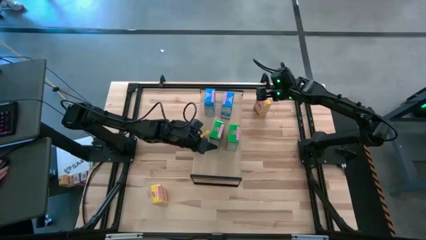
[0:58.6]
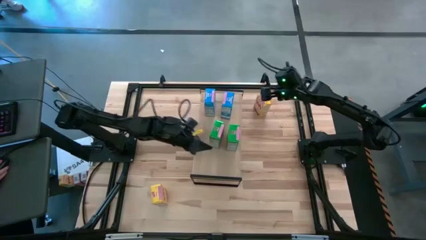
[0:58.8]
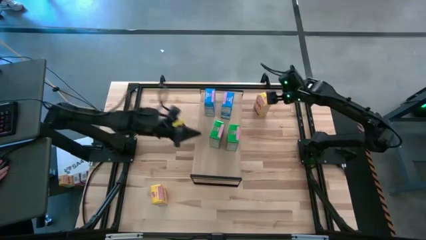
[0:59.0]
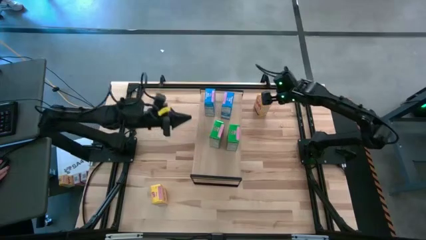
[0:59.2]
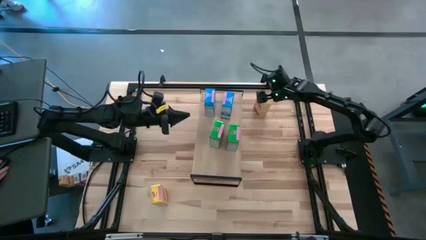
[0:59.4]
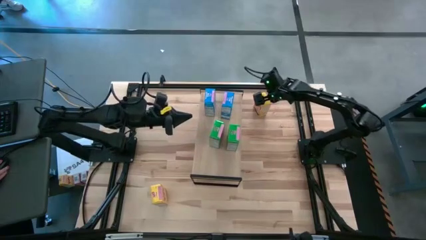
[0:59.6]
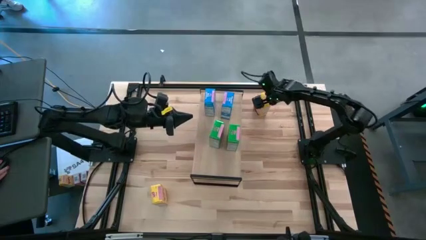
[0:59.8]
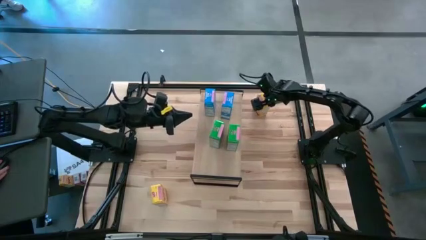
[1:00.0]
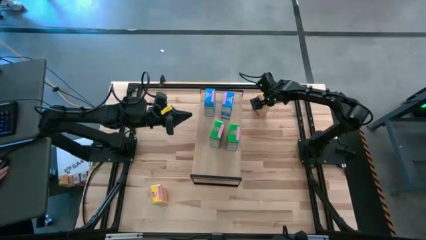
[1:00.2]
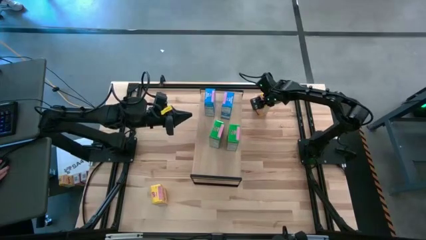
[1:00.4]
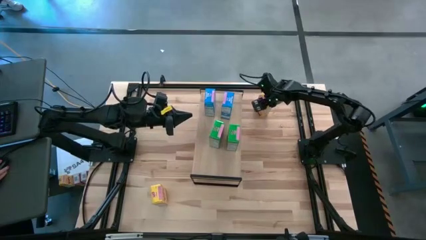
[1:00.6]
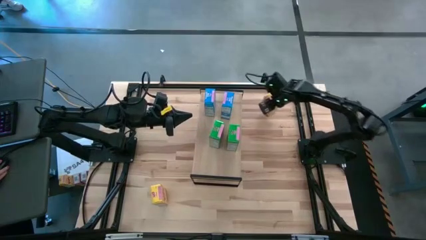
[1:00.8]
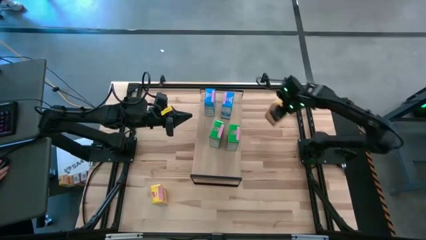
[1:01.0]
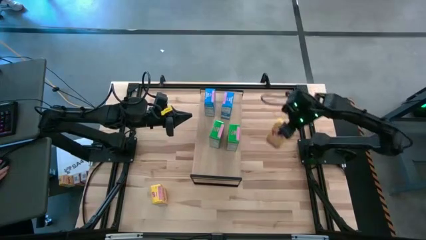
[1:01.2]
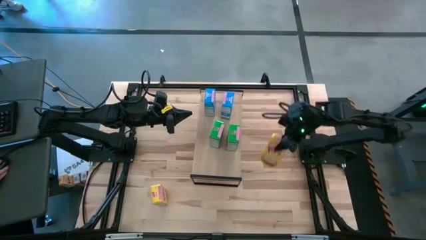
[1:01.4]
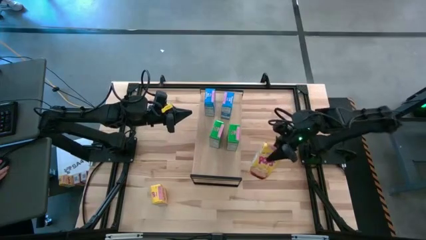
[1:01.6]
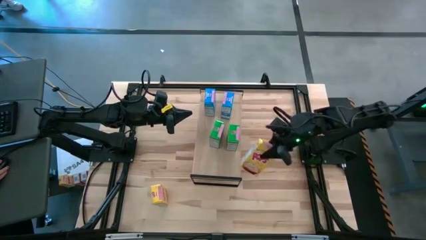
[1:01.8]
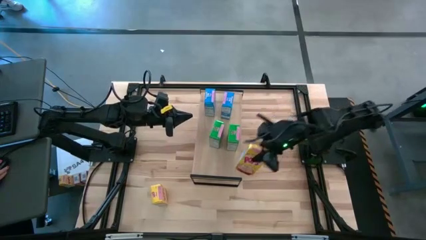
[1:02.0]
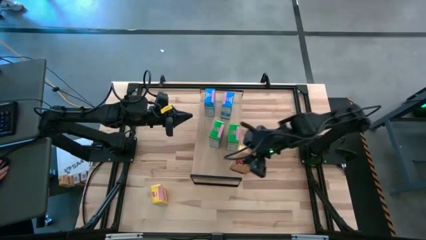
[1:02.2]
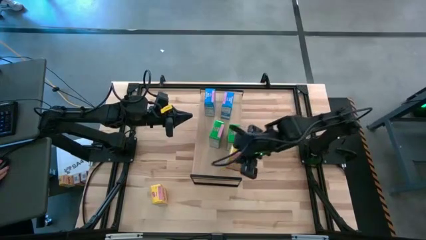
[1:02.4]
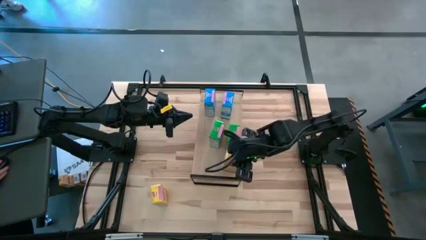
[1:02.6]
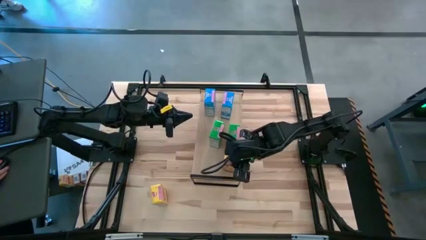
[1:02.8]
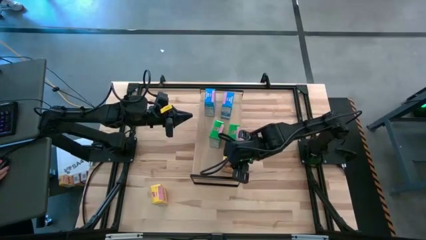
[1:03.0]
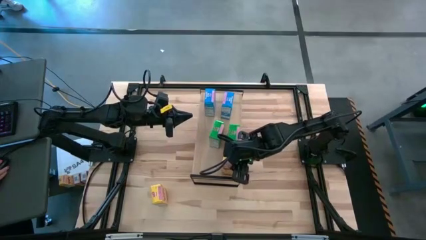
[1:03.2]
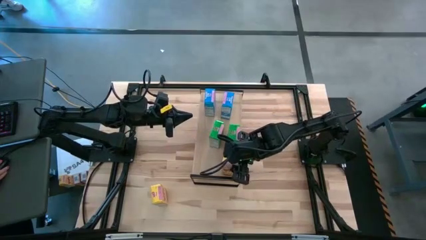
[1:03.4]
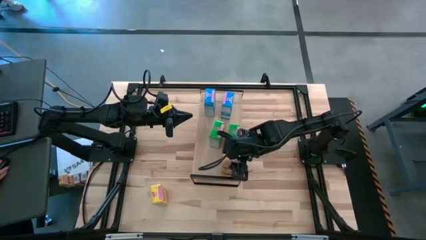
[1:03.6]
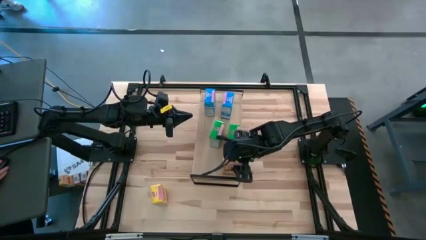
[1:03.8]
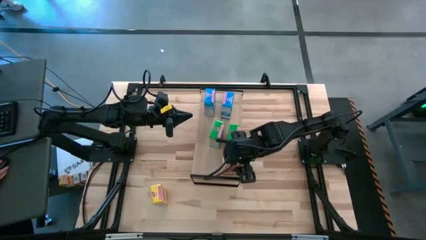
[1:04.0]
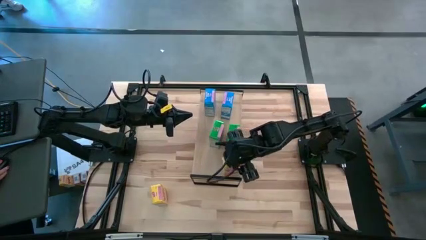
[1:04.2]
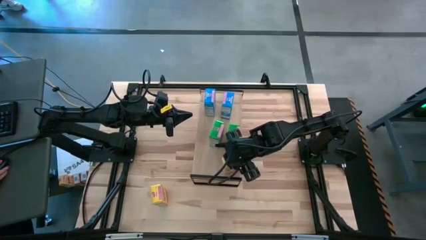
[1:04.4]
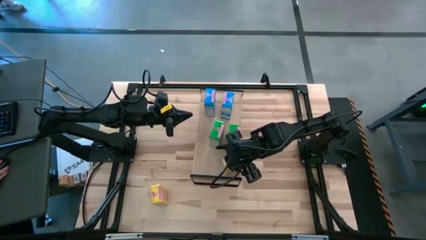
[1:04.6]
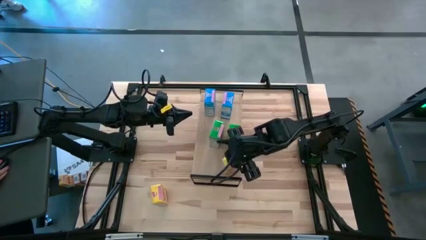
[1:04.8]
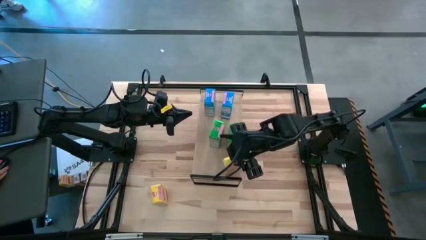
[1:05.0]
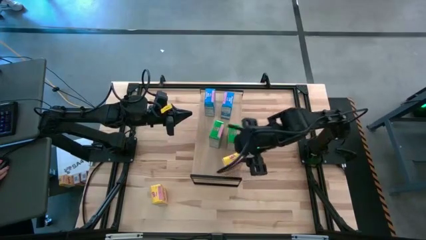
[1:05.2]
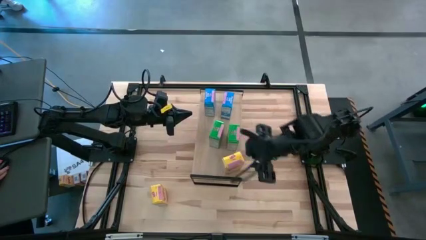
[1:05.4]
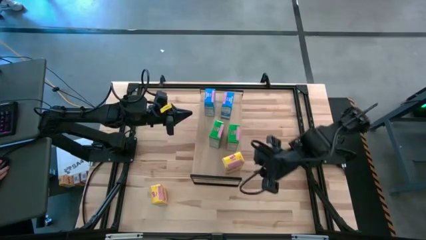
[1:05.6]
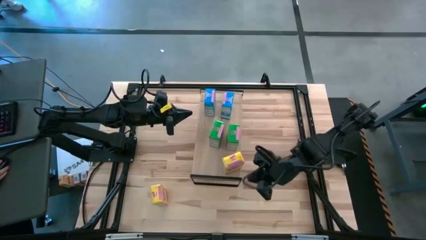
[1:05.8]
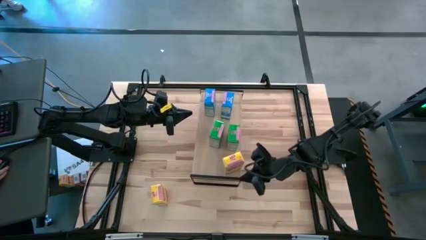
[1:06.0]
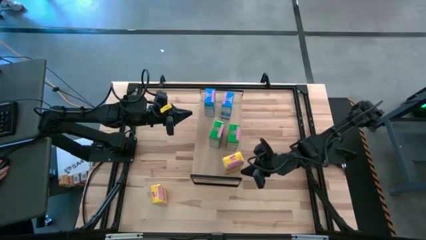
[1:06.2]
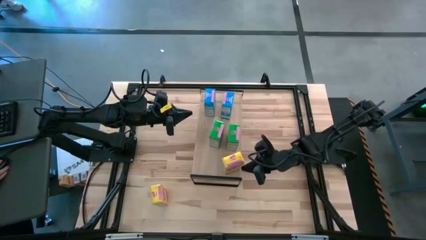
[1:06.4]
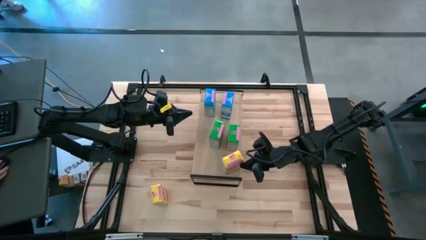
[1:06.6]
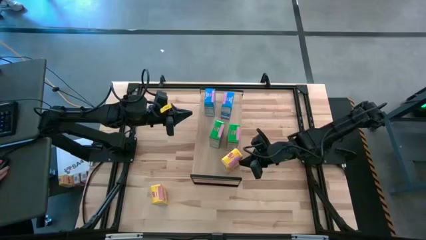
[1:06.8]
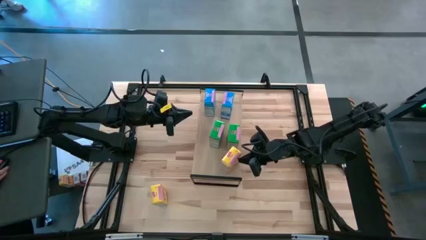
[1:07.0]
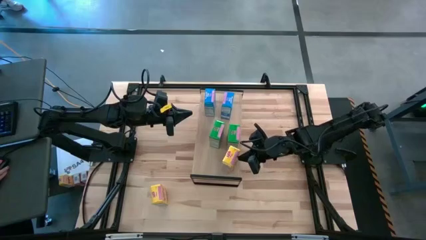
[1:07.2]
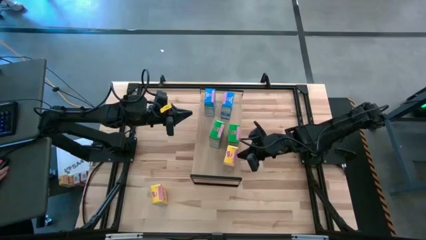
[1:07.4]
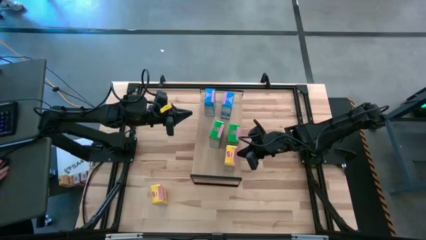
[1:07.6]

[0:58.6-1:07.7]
Task: Stack cereal on shelf
Put the top yellow cereal box on the shelf

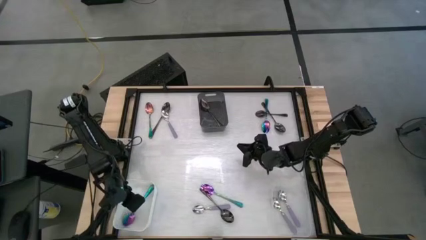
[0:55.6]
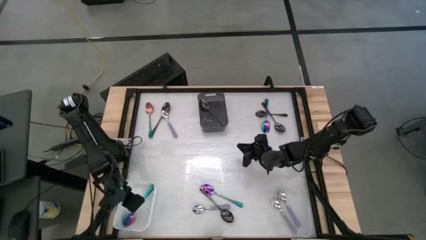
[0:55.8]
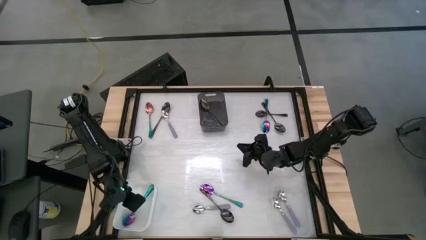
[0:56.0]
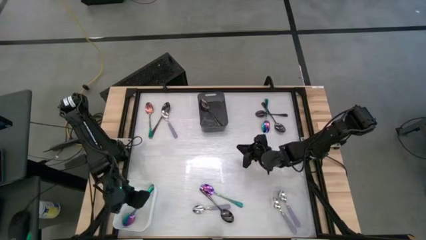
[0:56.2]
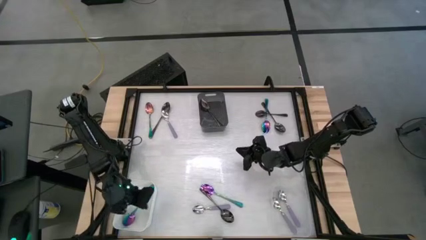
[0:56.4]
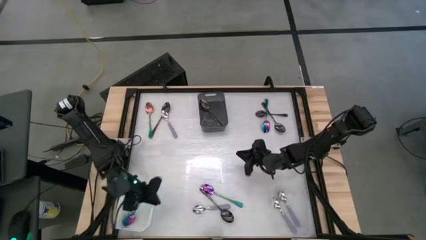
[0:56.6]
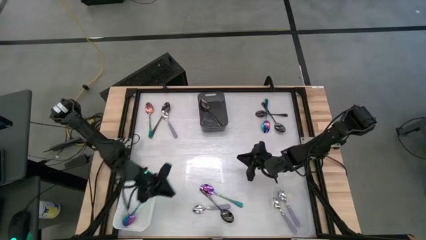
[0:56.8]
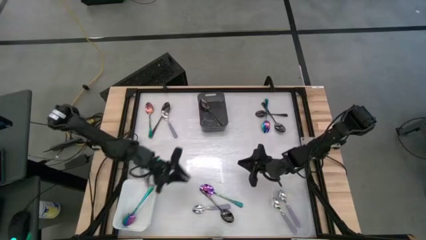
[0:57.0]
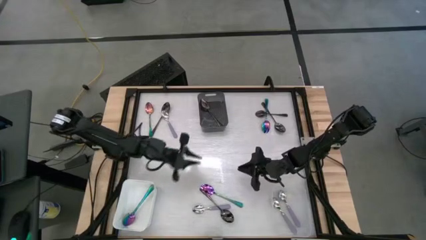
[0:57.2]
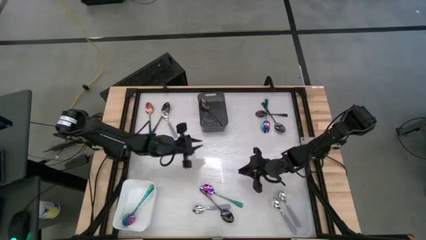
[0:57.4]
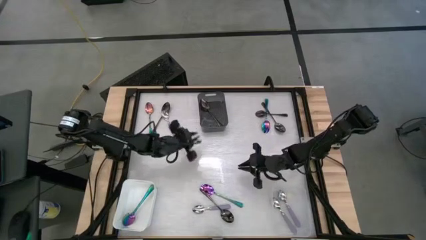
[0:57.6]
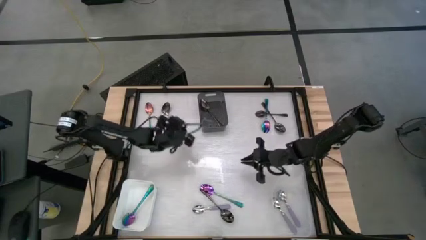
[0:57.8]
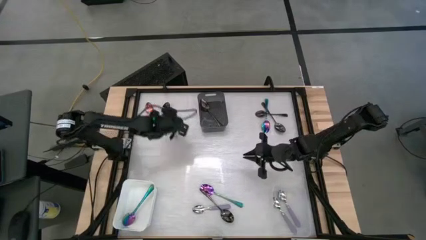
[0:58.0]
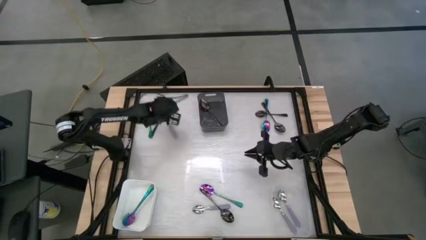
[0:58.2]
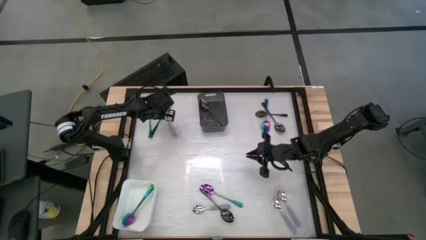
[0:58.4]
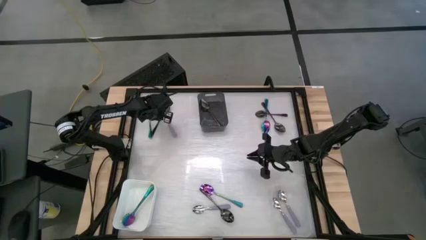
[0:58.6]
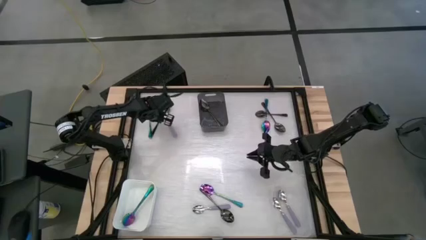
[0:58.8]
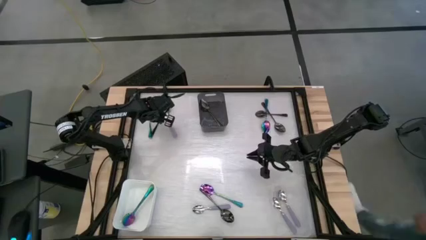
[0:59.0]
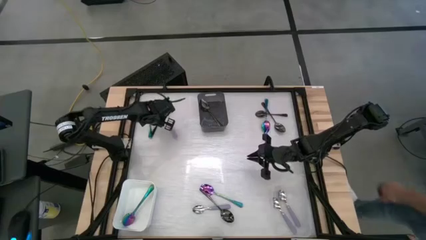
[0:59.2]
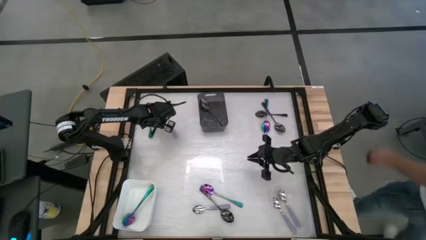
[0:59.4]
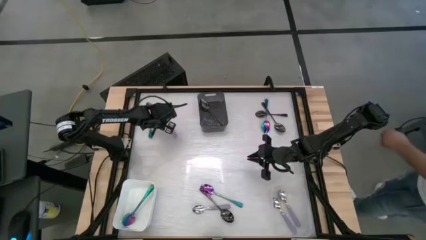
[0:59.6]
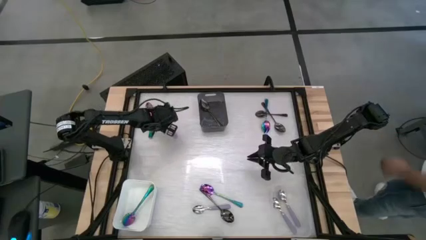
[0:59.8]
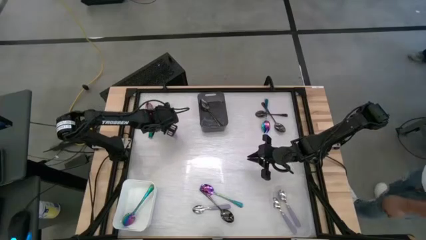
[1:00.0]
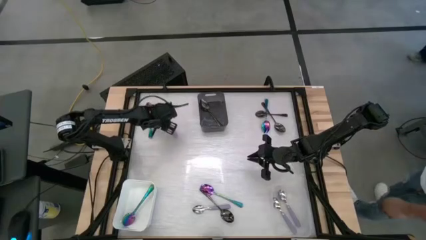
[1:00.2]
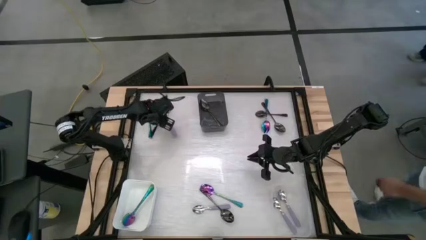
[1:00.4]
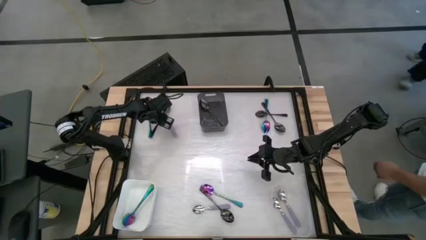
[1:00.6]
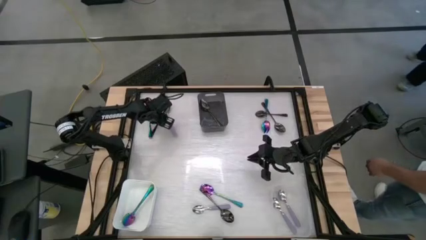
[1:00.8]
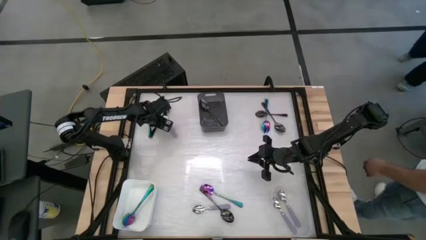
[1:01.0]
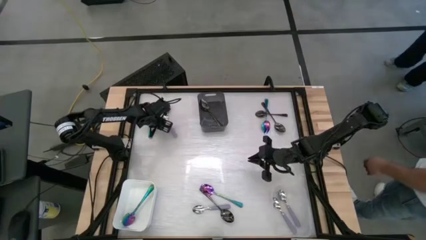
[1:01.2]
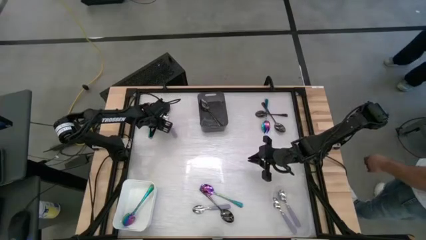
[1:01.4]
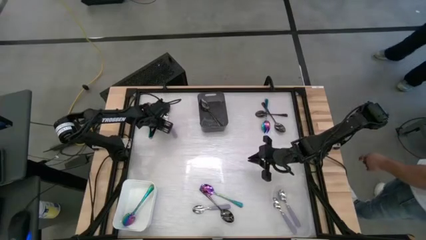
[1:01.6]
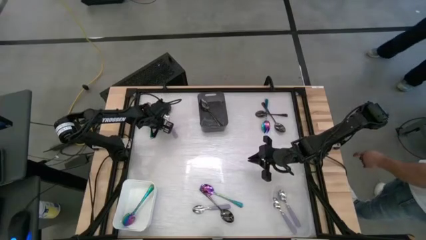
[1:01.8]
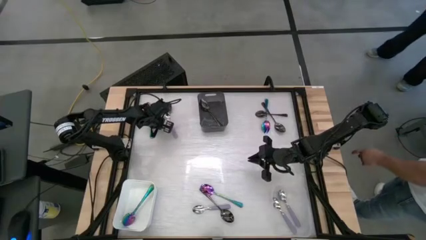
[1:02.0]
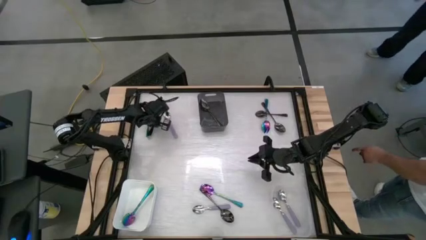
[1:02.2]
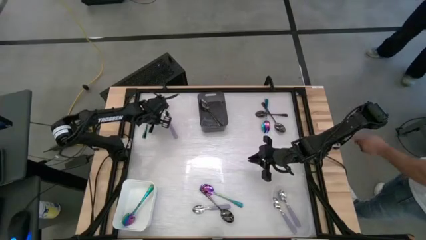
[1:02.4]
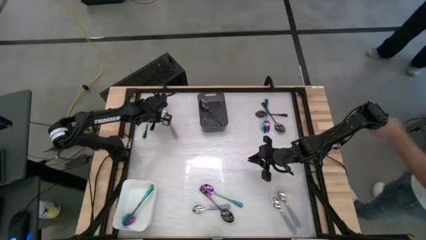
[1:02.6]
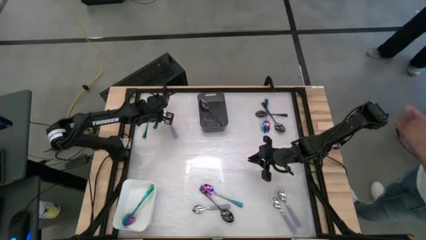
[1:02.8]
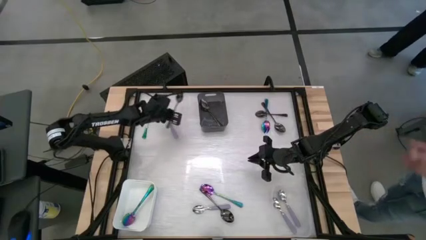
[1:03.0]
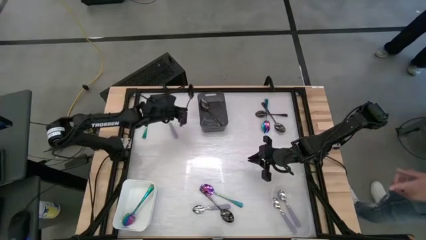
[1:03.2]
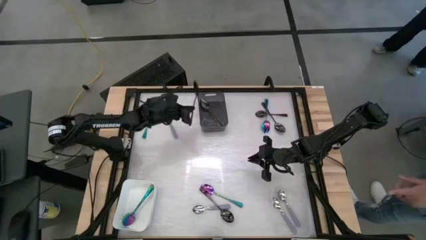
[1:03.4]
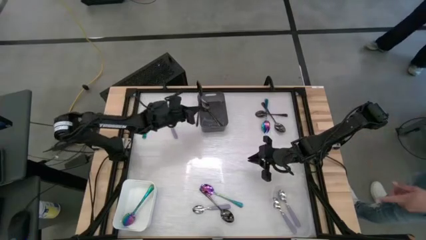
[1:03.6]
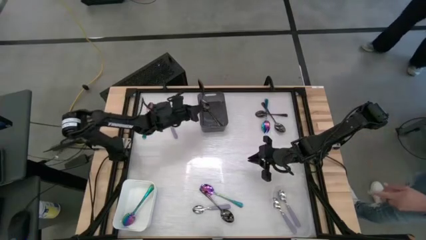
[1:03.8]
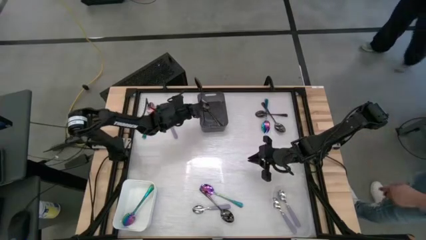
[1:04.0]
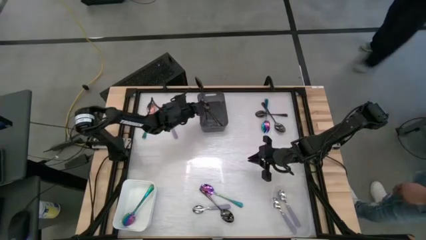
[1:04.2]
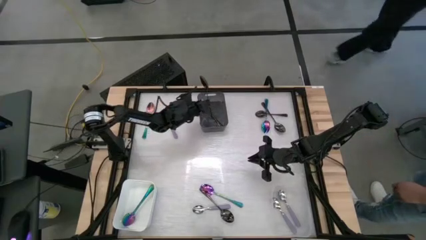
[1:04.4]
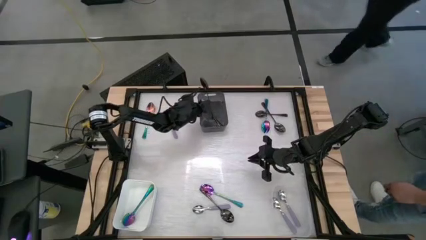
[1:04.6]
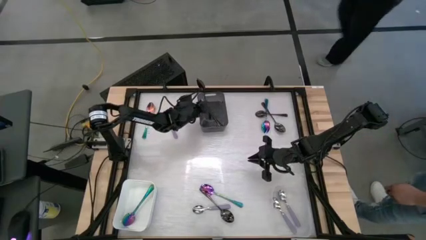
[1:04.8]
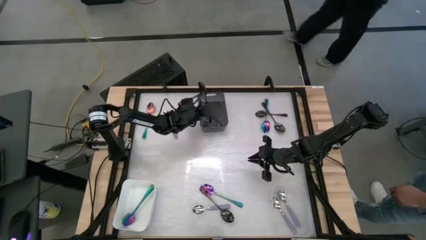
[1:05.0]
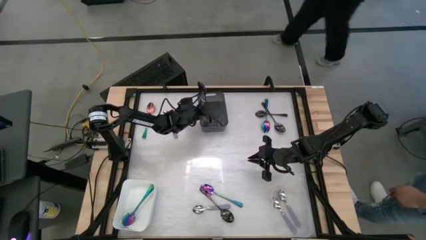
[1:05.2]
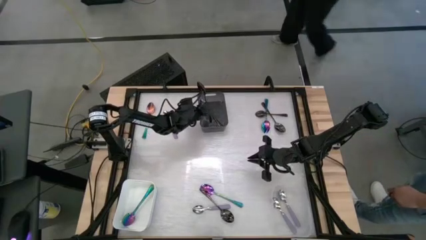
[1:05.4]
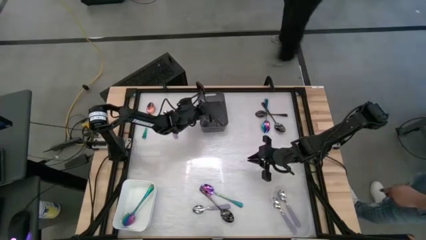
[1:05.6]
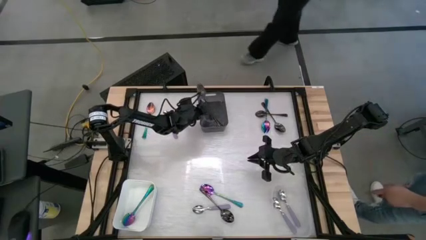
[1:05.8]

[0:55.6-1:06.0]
Task: Sort silverware by color (type)
Put the black spoon into the black bin
